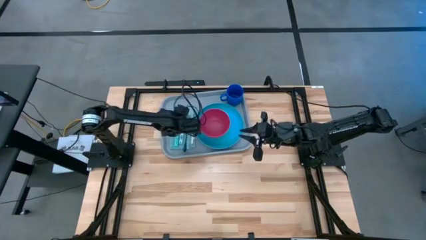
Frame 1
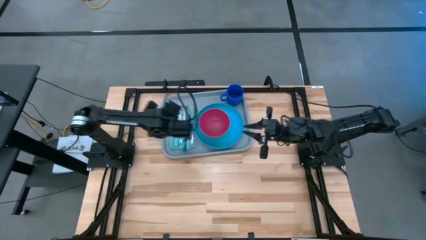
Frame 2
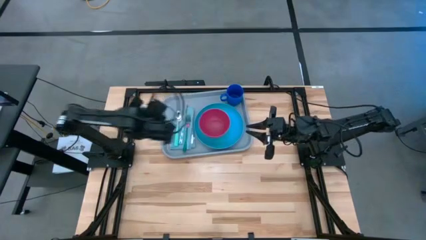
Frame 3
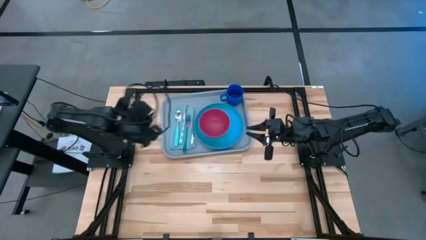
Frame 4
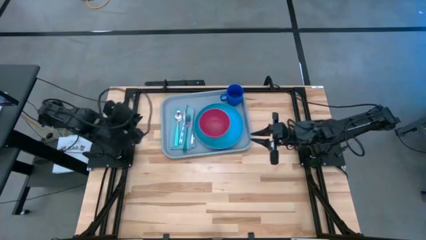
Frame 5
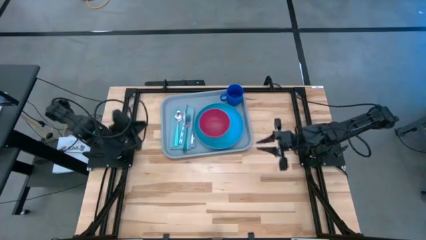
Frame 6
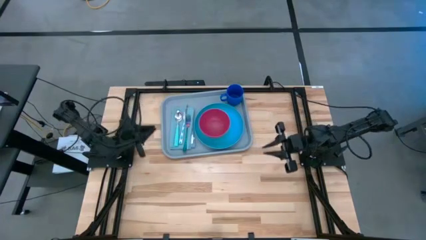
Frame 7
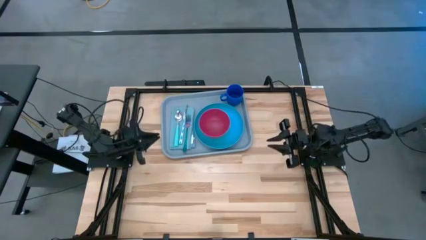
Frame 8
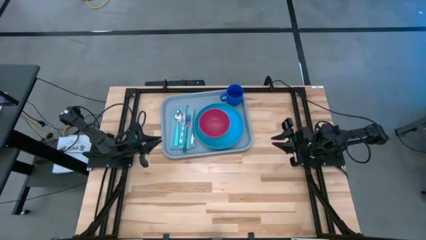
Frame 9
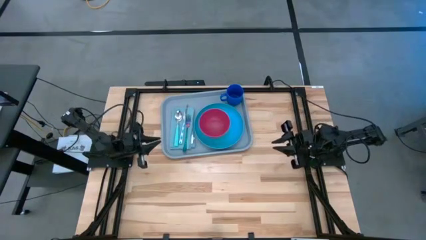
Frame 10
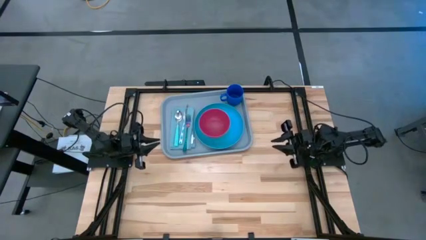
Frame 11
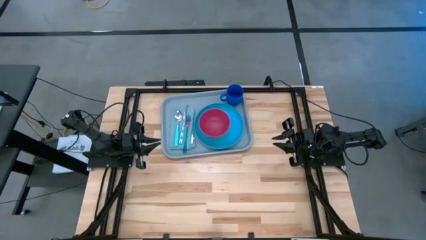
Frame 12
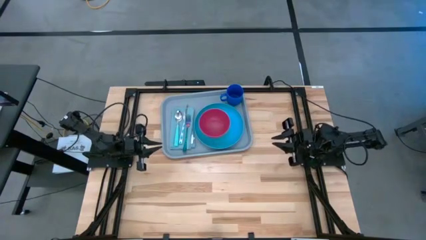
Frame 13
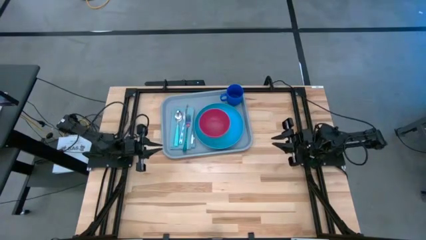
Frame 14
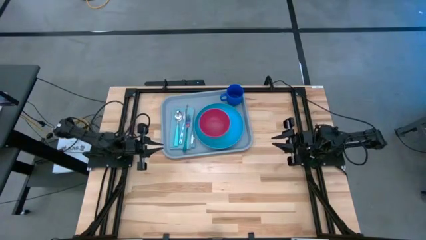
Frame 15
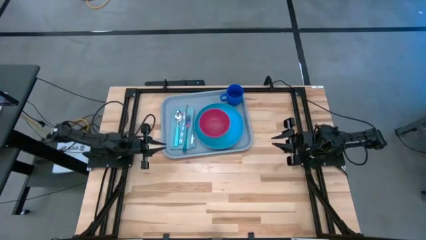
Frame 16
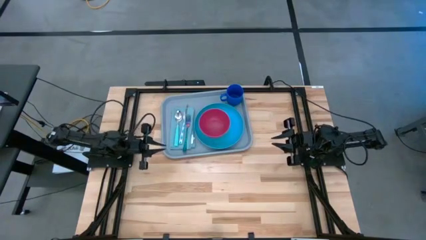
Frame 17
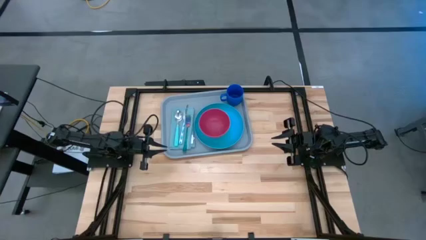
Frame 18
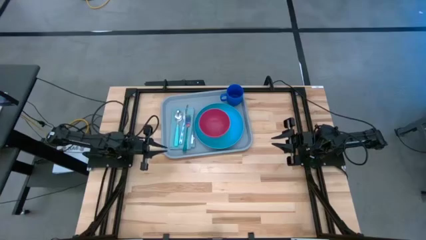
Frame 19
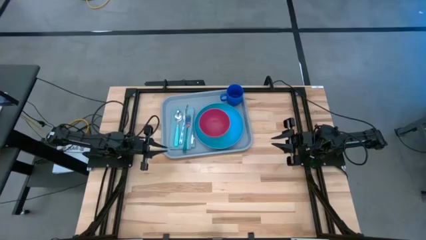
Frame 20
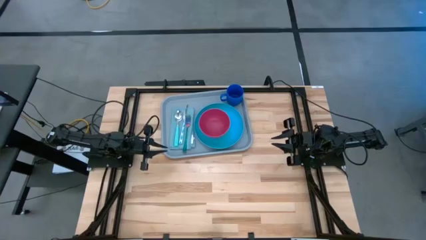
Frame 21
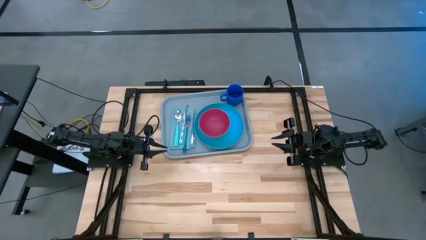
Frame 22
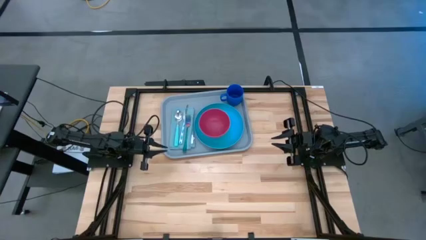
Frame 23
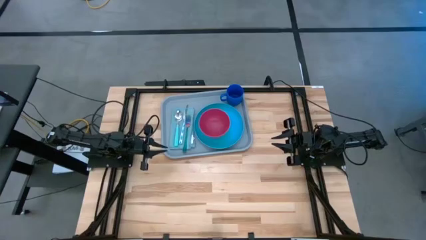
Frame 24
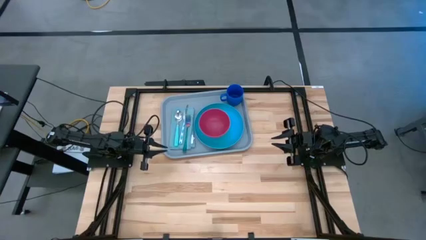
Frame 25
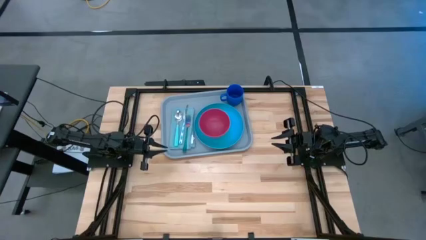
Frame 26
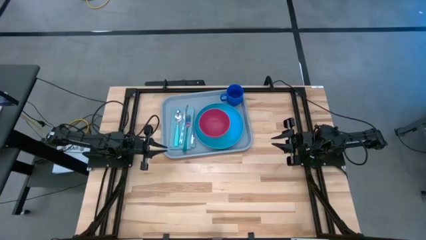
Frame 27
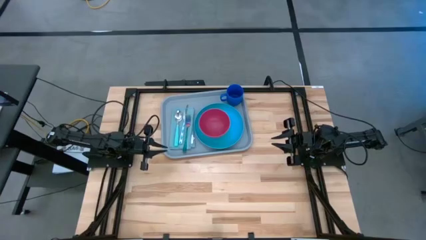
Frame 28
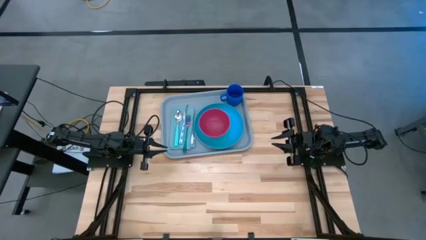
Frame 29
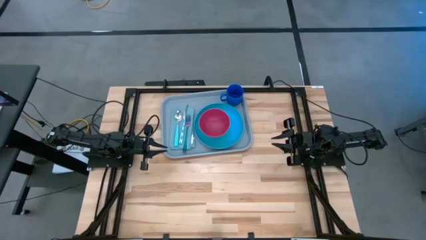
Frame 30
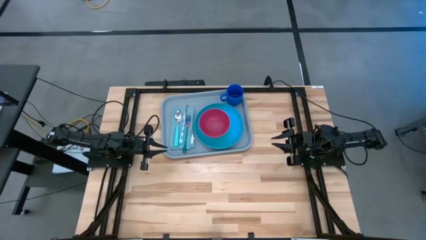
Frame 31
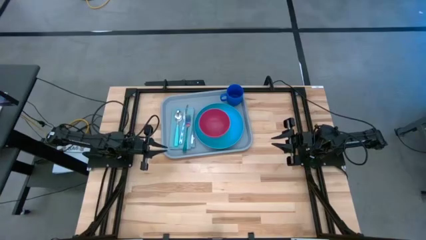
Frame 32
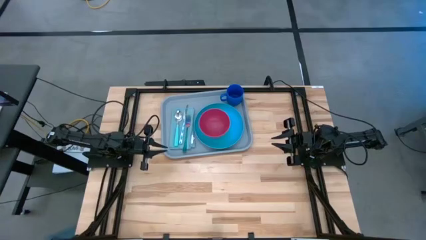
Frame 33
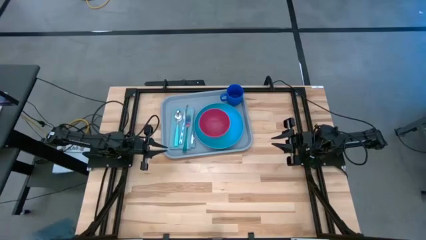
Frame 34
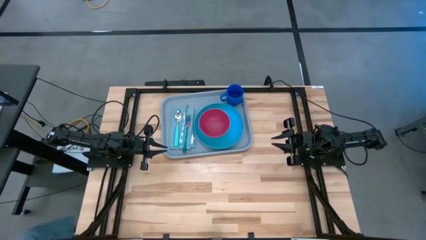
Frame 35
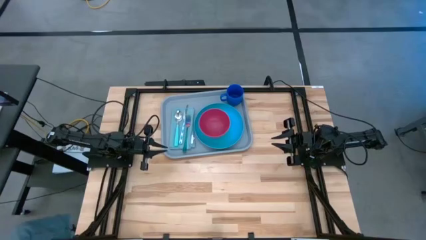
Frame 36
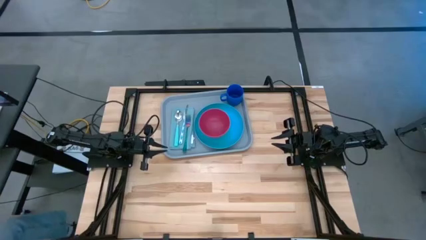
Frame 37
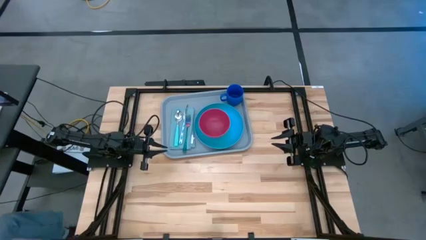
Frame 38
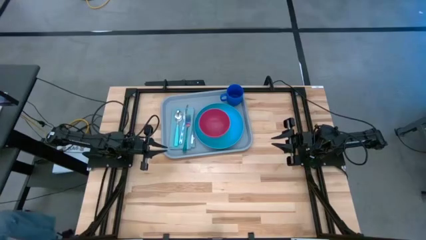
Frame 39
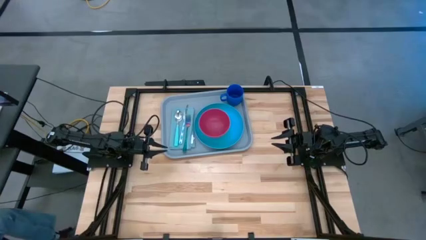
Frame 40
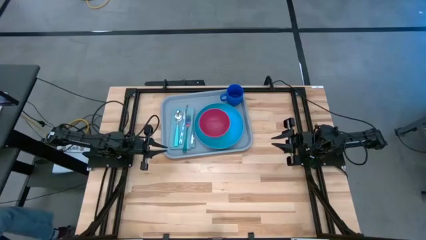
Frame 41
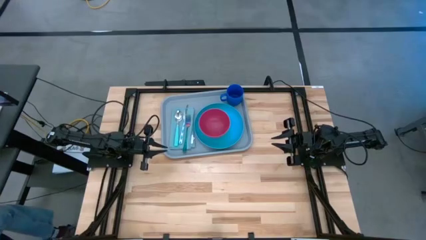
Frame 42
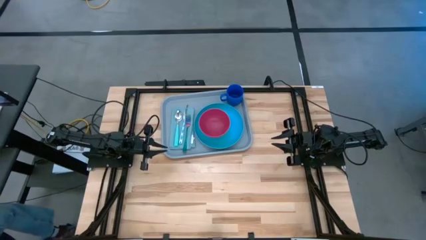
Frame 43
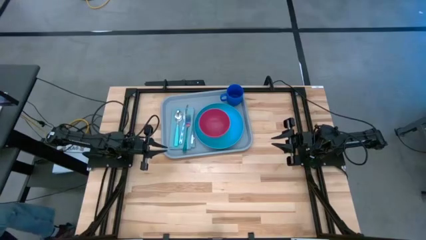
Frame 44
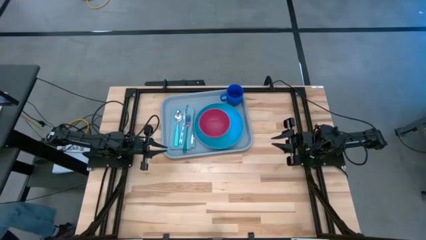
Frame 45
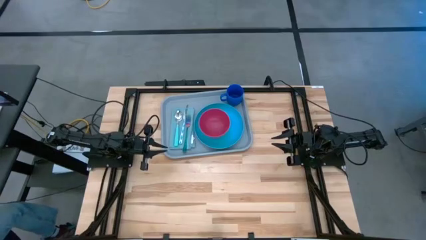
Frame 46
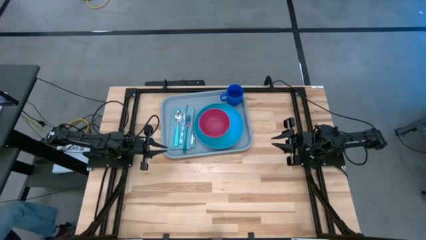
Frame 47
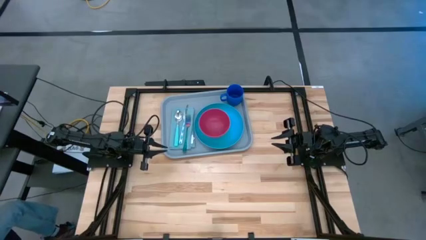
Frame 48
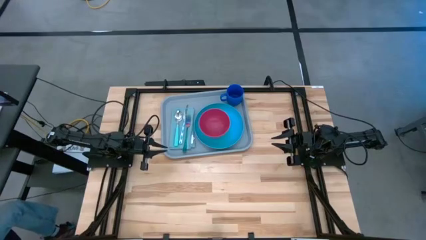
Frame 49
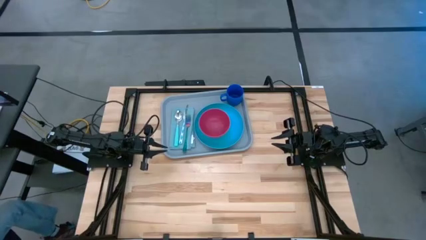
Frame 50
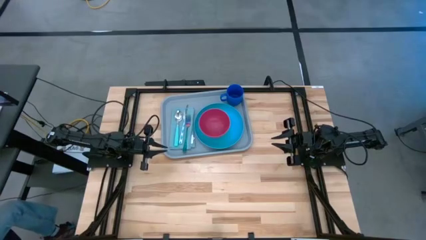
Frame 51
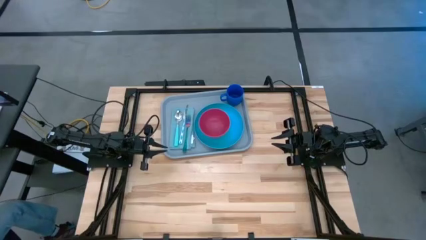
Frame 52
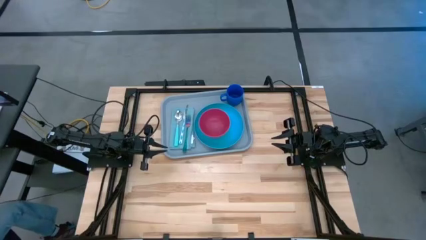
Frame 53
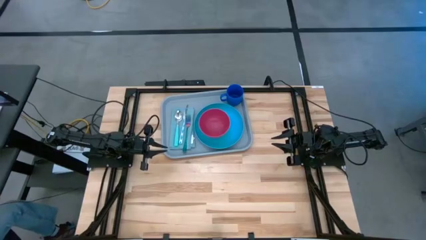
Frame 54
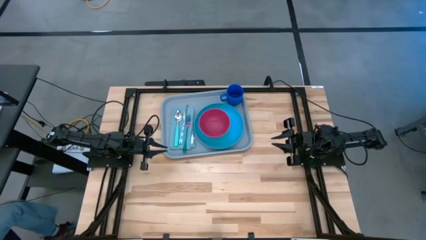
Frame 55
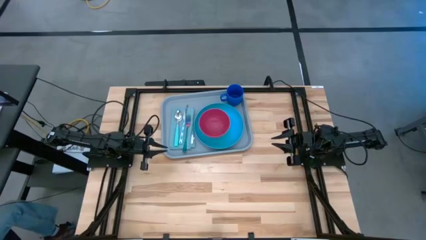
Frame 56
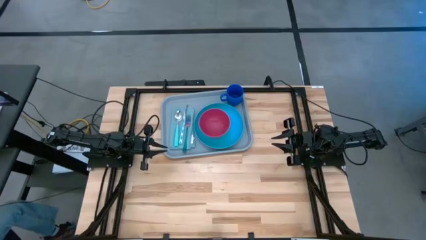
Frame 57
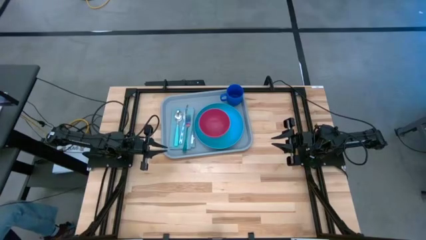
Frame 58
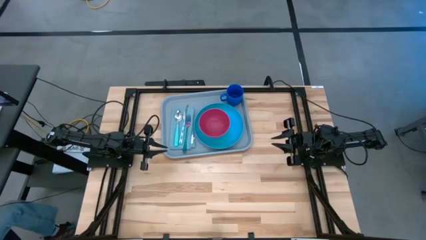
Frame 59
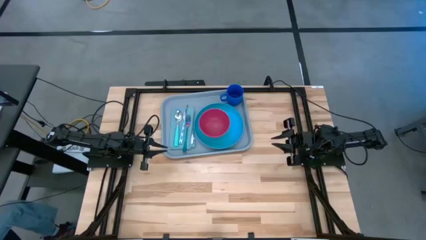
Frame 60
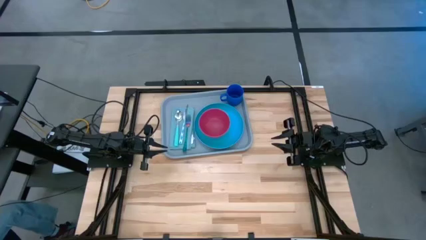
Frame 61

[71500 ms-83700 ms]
Task: Set up tray
Return to Home Position

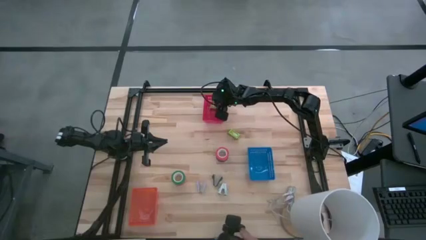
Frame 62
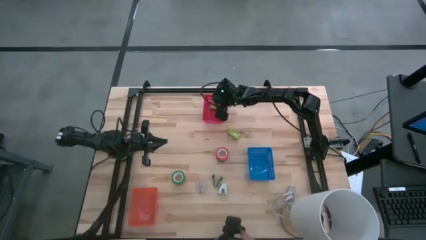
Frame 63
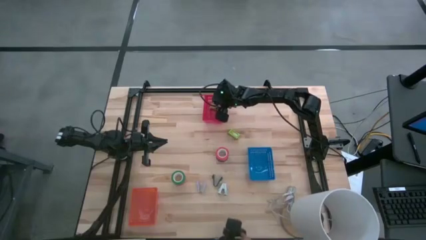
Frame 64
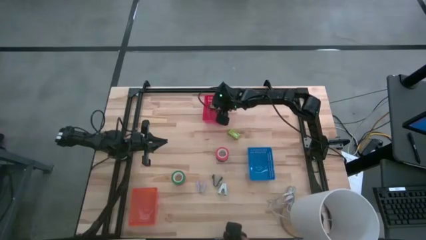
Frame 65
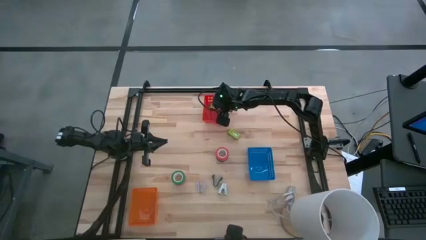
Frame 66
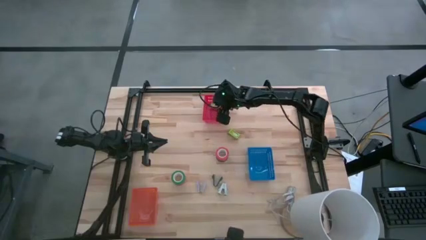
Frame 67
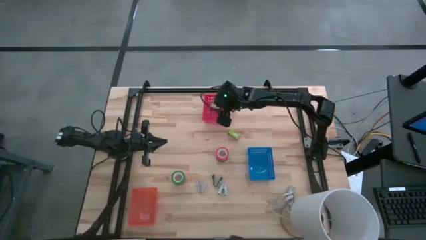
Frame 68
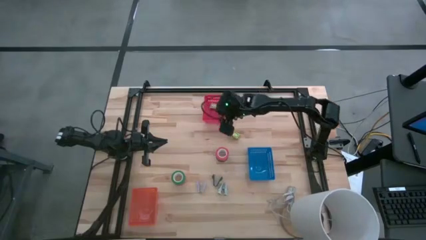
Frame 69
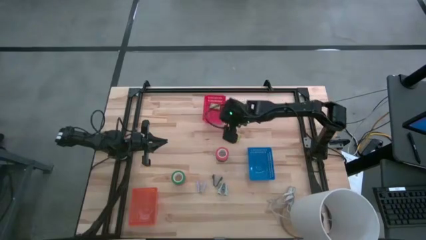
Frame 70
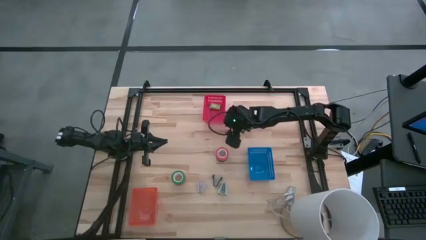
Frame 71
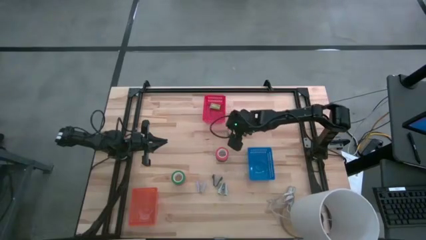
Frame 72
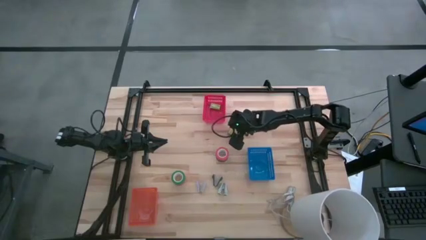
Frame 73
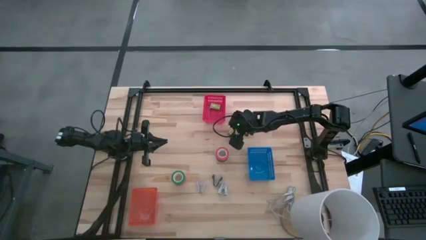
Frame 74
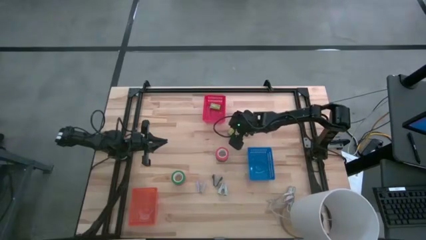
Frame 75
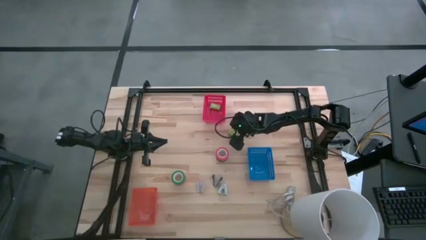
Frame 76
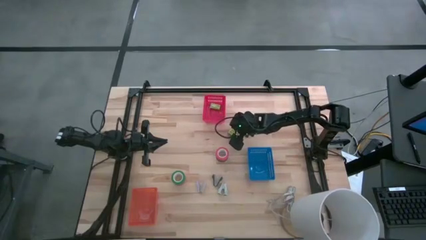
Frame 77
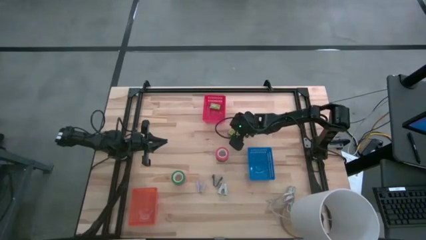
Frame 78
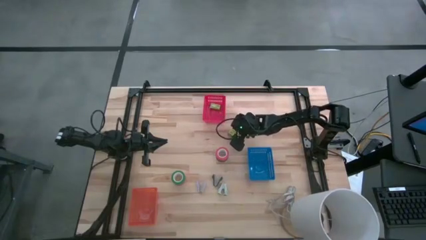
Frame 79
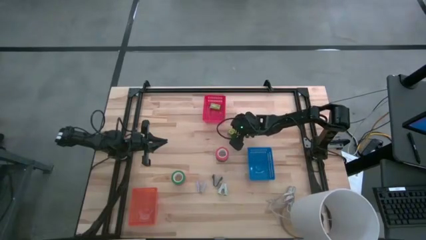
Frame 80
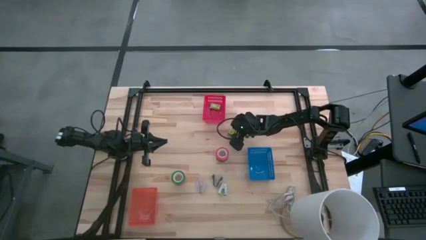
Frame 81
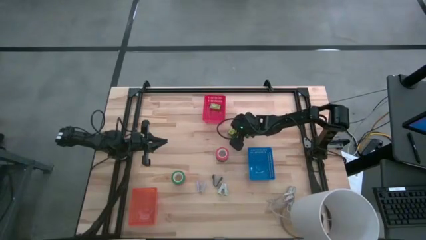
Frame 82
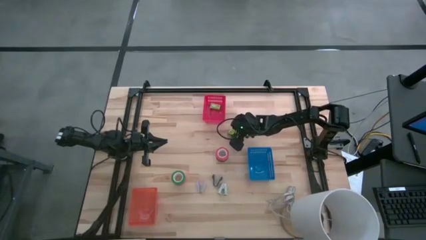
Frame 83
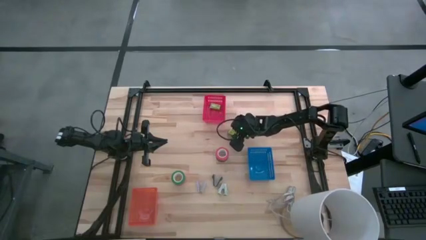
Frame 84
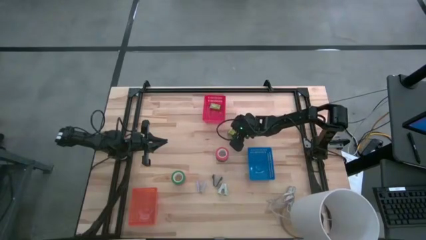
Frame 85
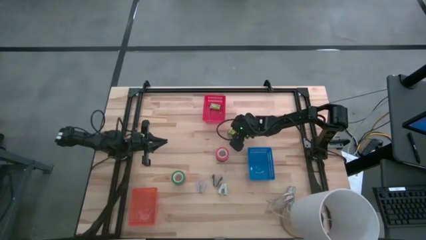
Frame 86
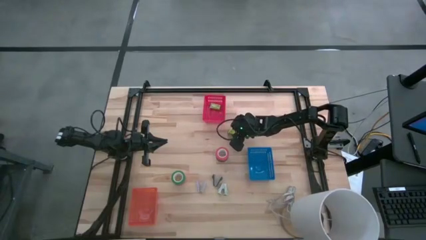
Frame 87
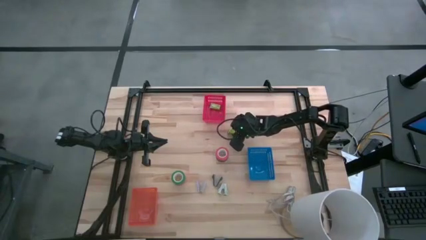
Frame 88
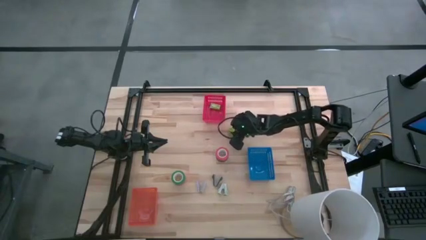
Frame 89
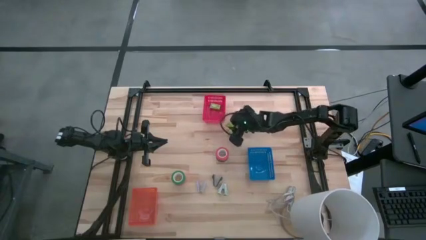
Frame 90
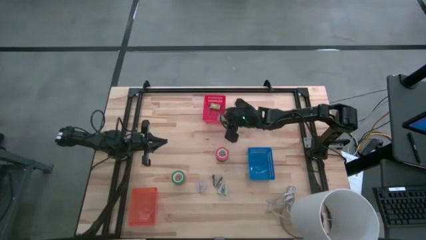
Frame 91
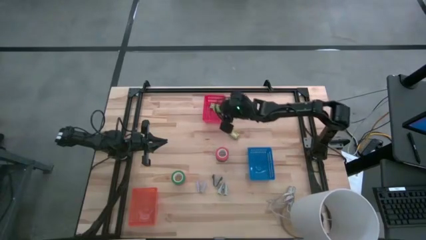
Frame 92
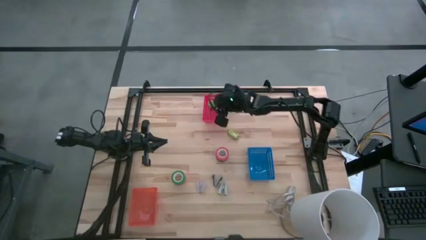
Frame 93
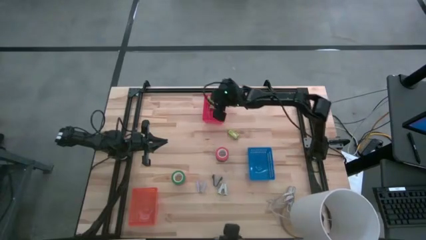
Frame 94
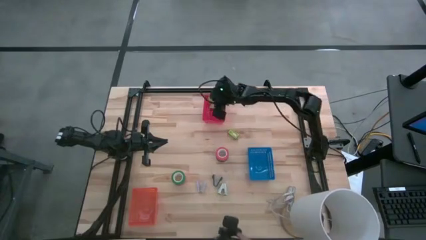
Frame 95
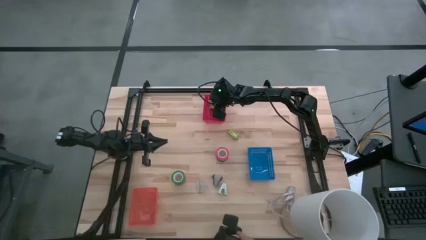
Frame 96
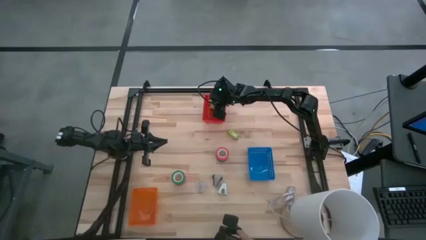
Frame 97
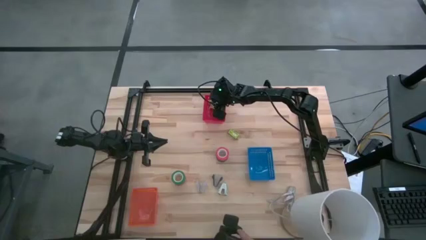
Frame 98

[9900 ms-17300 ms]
Task: Pick and place Stapler, Stapler remover, tape
Put the top green staple box into the red bin
